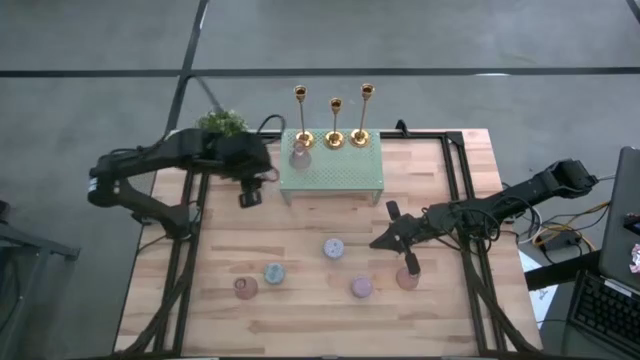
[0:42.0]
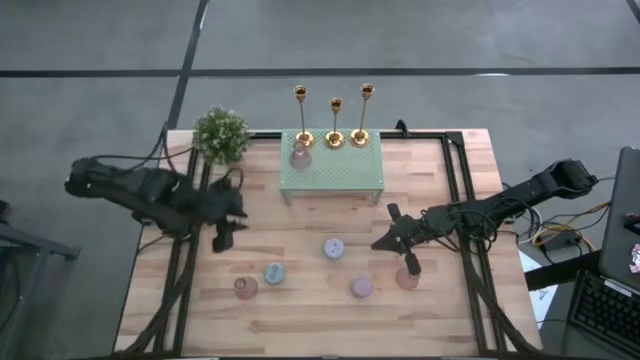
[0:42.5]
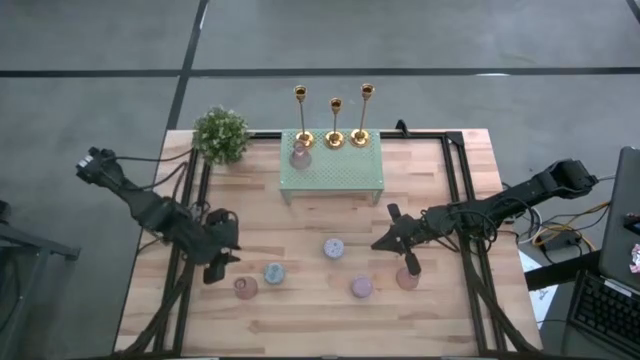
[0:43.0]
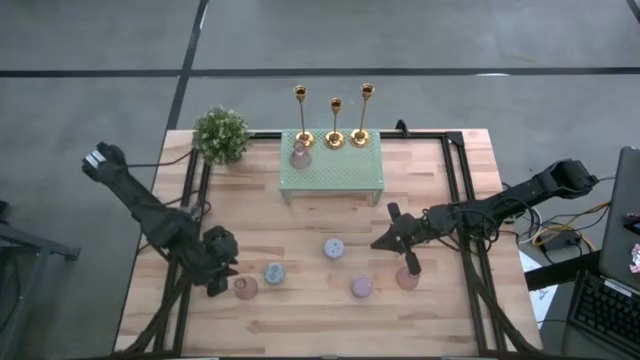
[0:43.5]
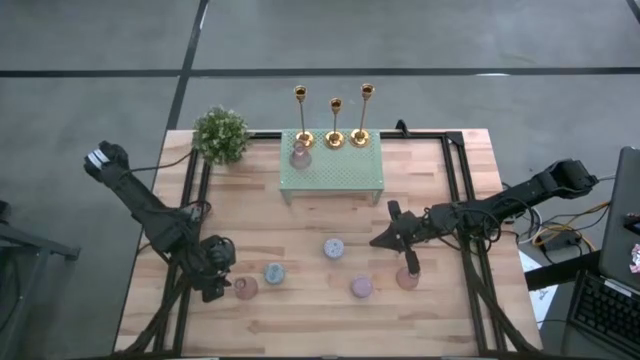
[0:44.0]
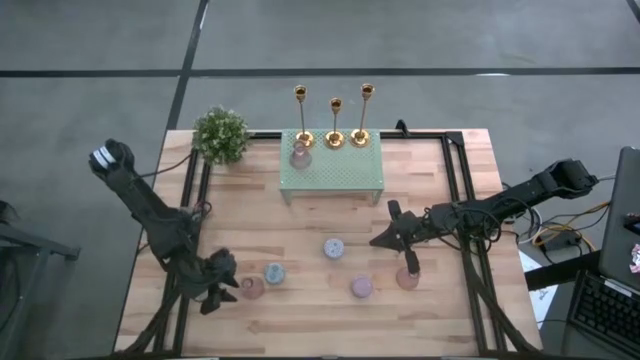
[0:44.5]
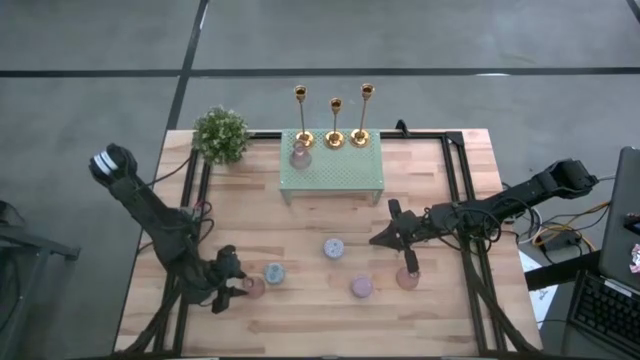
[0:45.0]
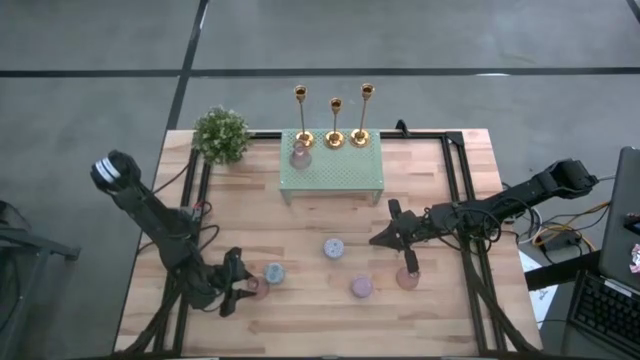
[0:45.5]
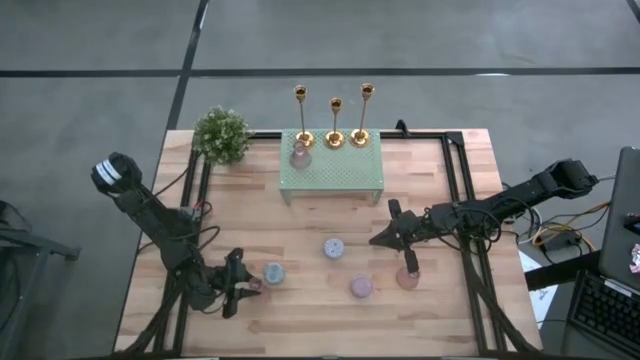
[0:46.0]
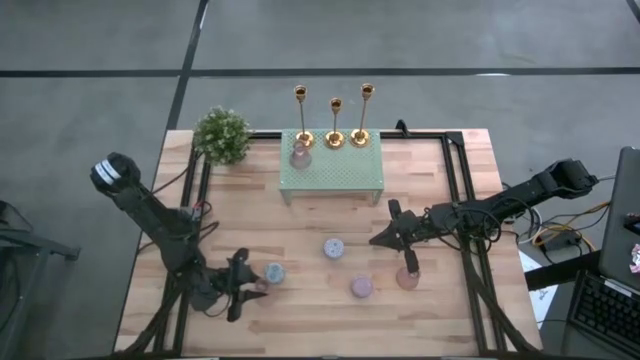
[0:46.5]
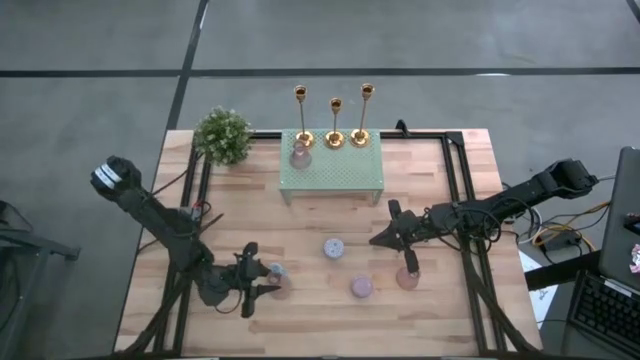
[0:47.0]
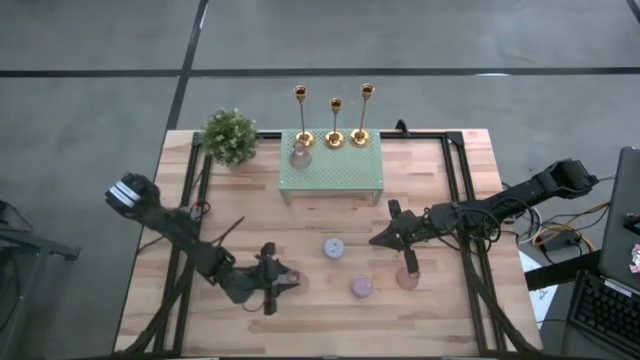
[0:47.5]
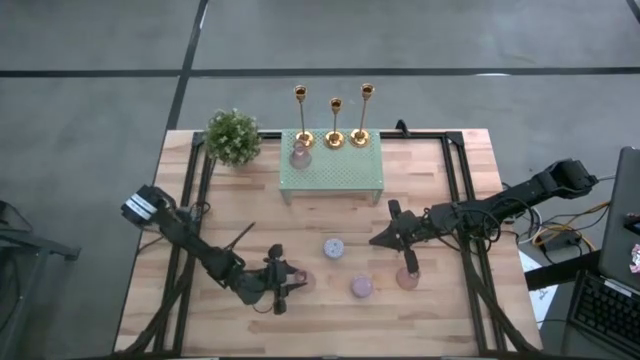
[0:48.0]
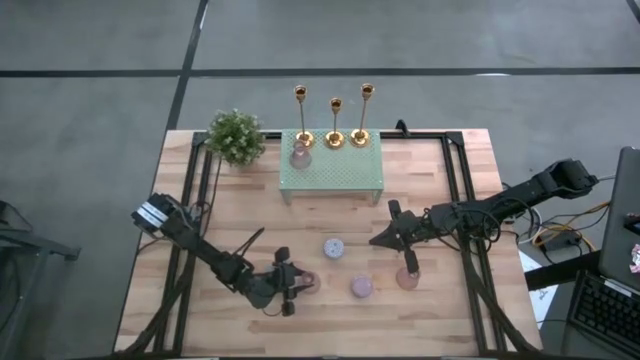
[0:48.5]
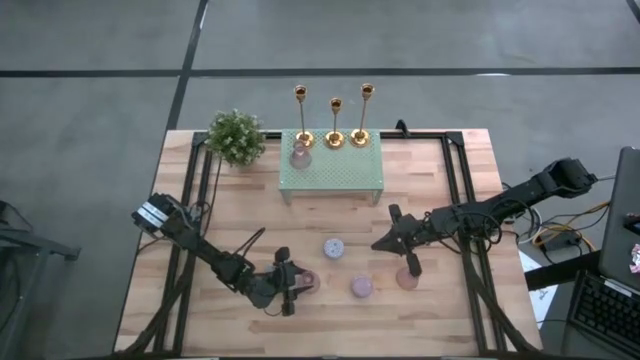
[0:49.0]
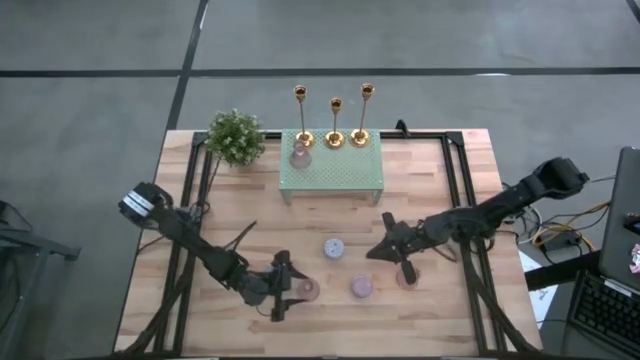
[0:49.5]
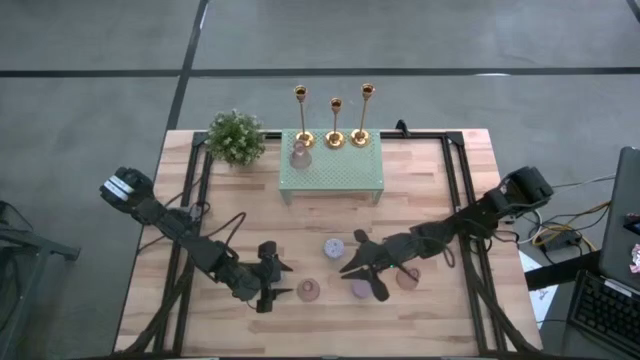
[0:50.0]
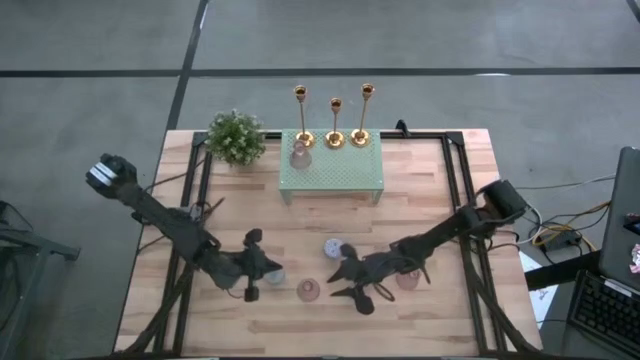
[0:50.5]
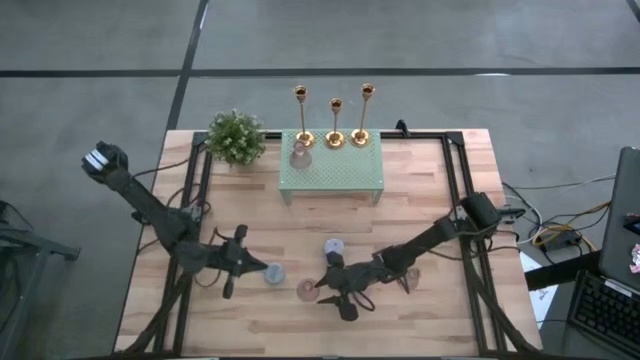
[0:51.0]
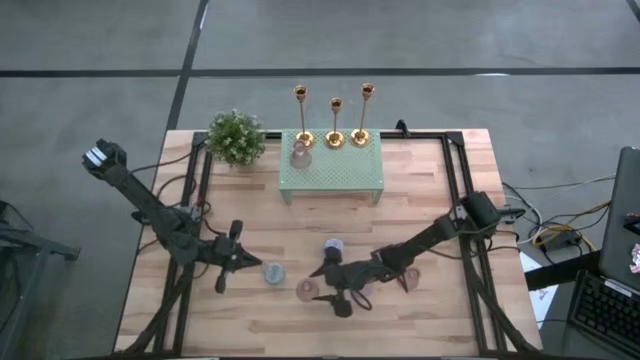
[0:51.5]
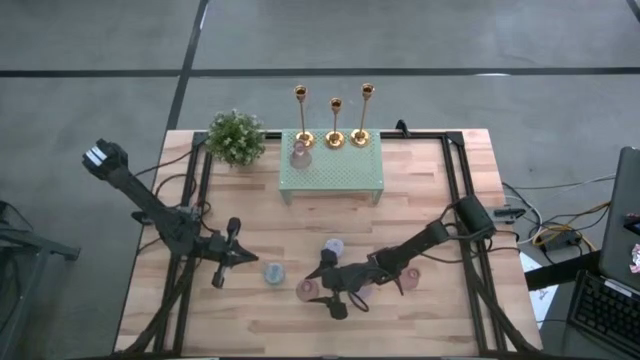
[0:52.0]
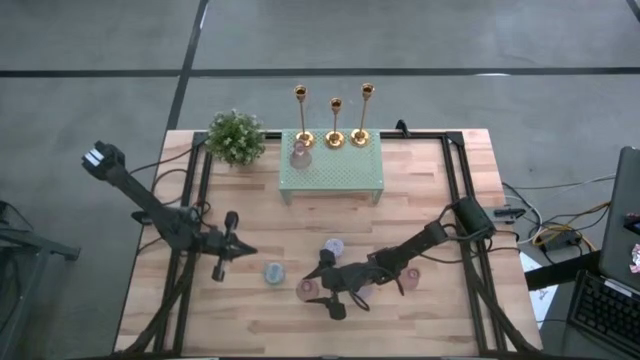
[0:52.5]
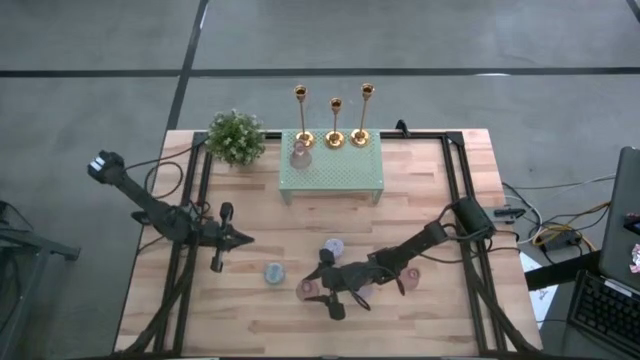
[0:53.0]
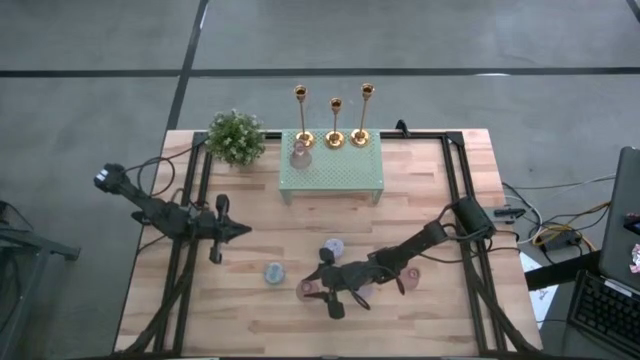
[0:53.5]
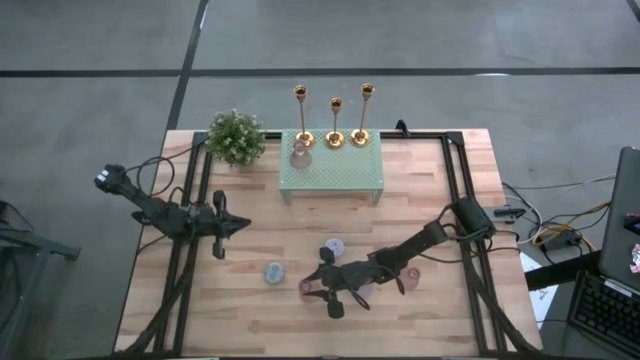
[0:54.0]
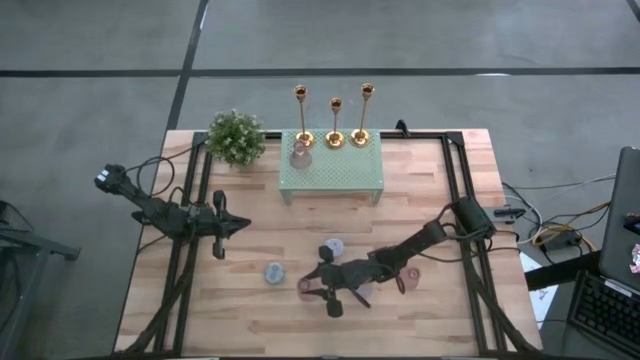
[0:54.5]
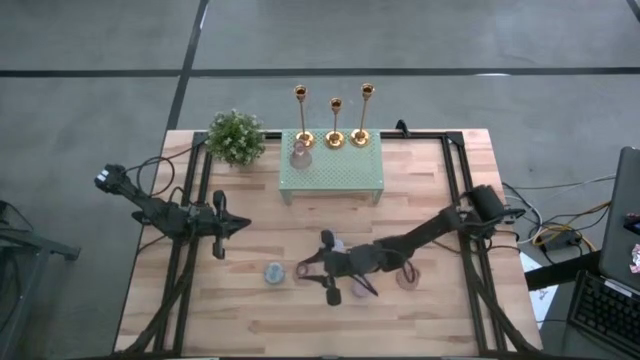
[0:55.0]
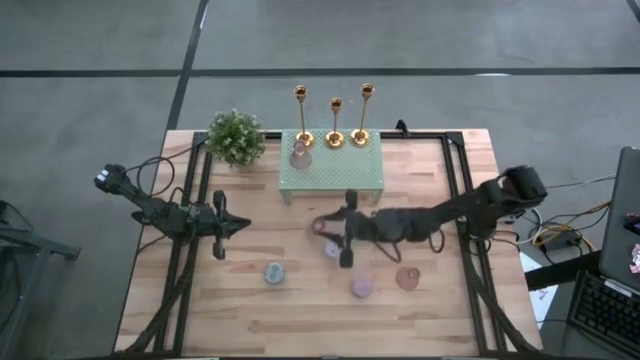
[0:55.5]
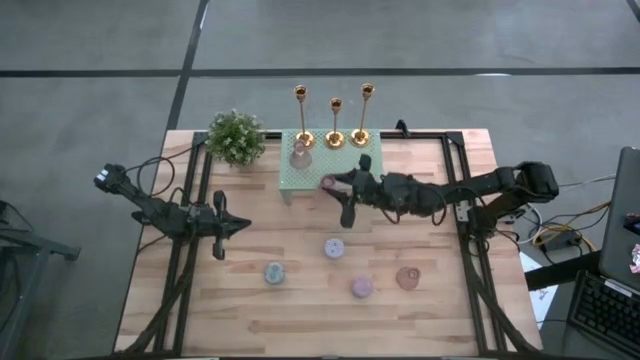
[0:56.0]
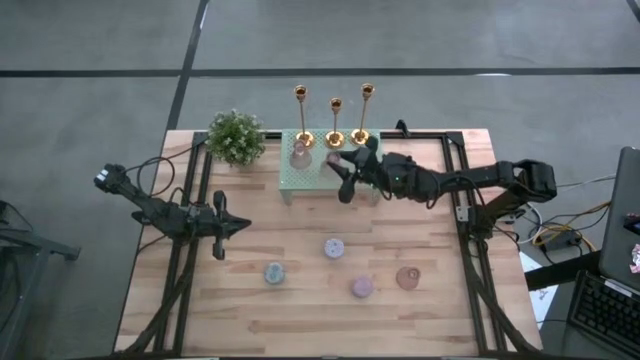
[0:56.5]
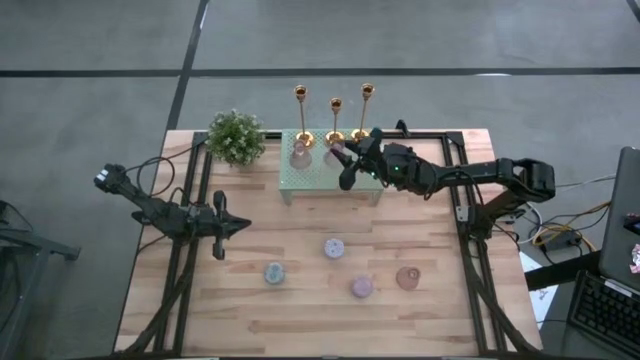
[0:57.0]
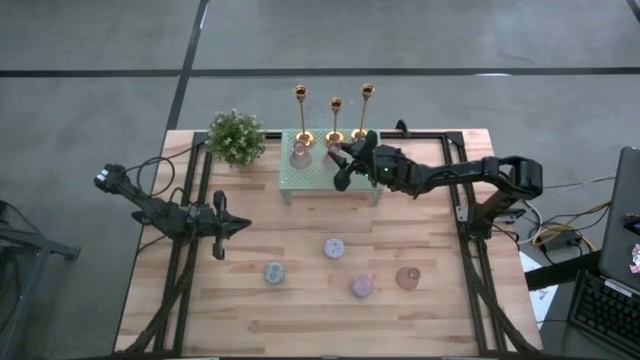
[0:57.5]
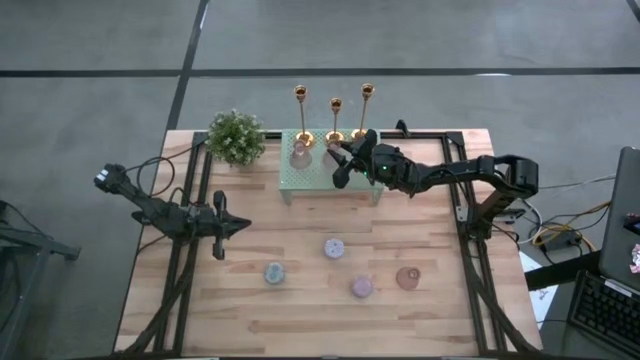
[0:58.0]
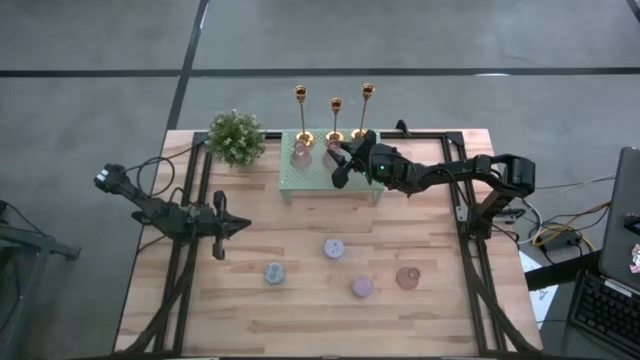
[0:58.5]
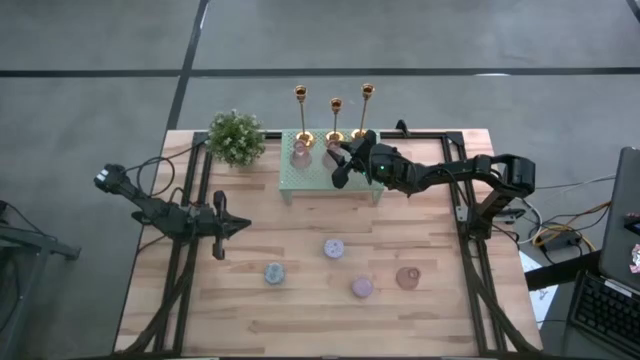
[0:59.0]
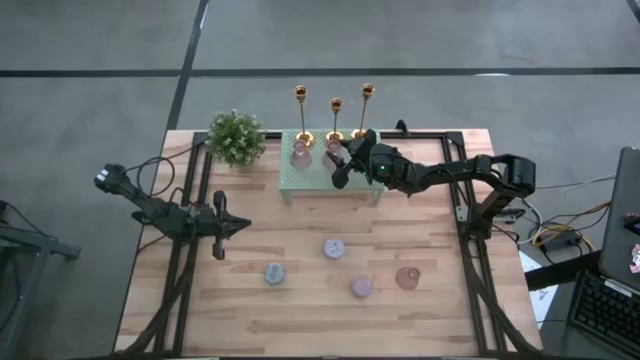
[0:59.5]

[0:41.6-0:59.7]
Task: Stock candles and vases on shelf
Align the left pink glass vase with the other pink vase on the shelf

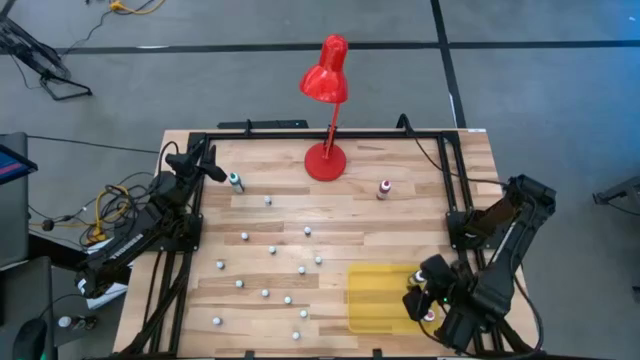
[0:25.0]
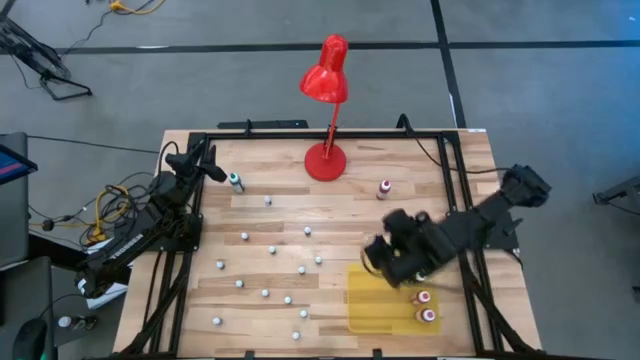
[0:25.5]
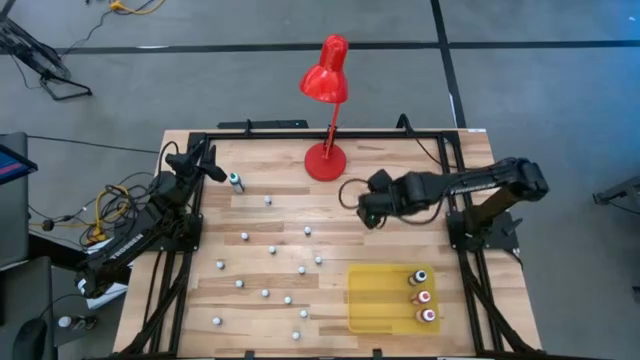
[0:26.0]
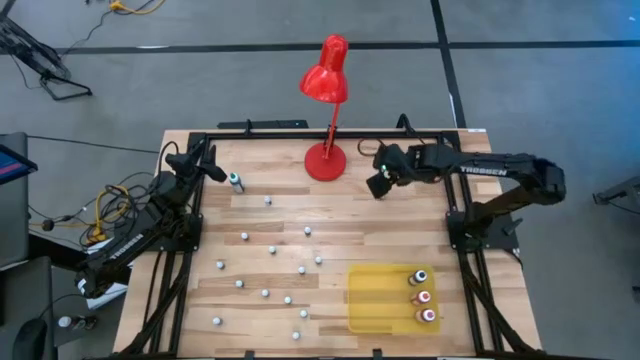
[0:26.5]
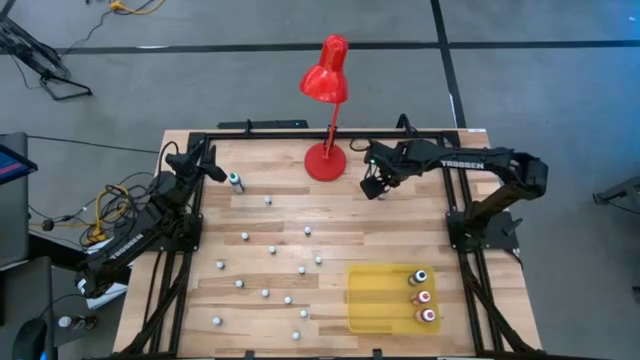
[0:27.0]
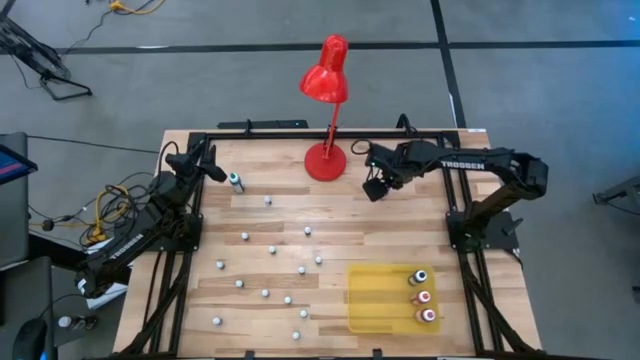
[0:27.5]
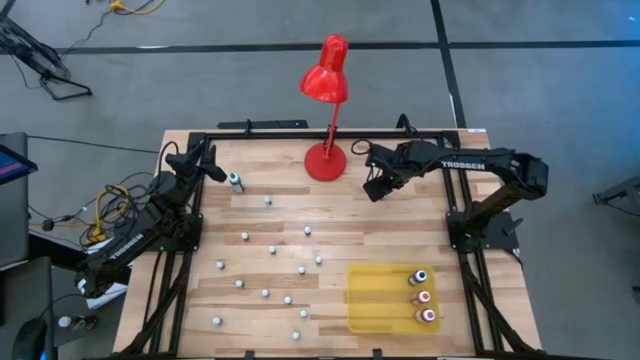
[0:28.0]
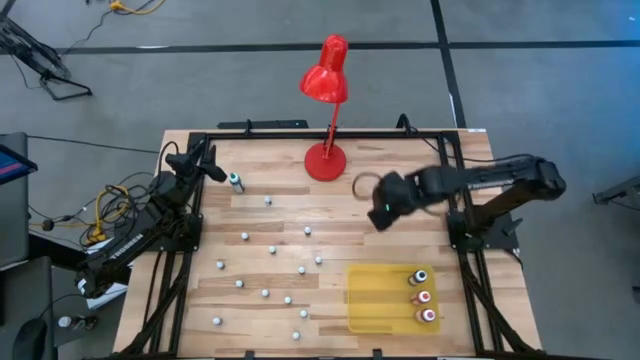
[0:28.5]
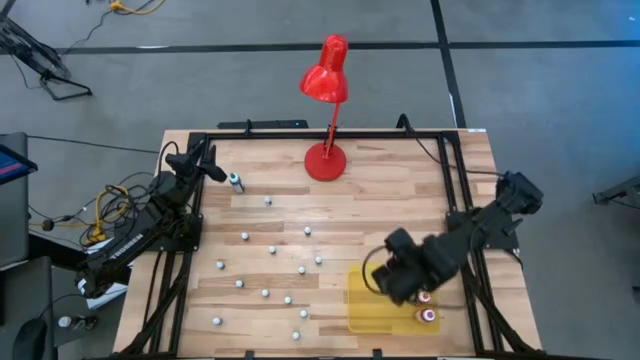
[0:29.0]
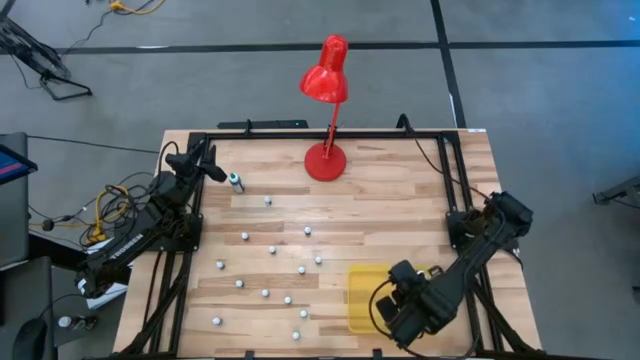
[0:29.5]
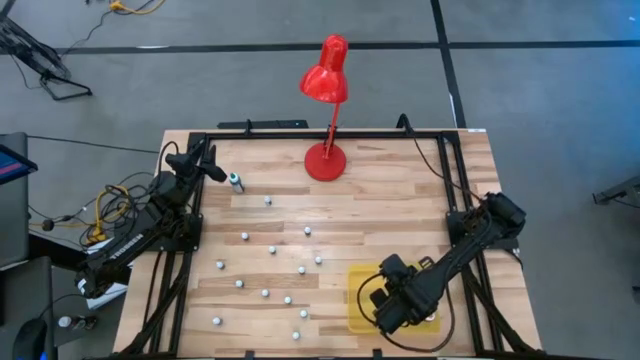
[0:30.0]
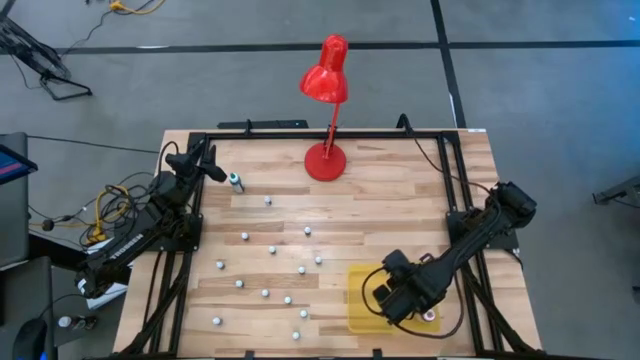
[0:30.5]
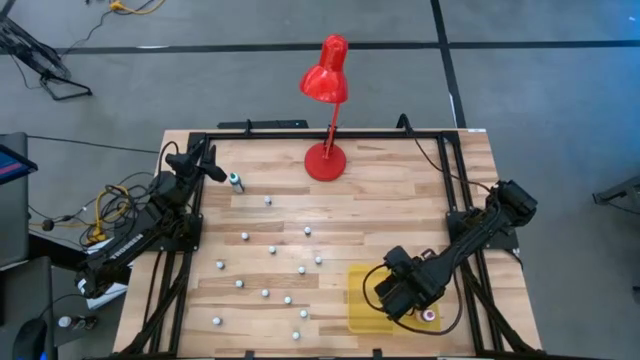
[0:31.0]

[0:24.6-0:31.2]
Task: Pick & Place food coloring
Put the large red food coloring into the yellow bin
